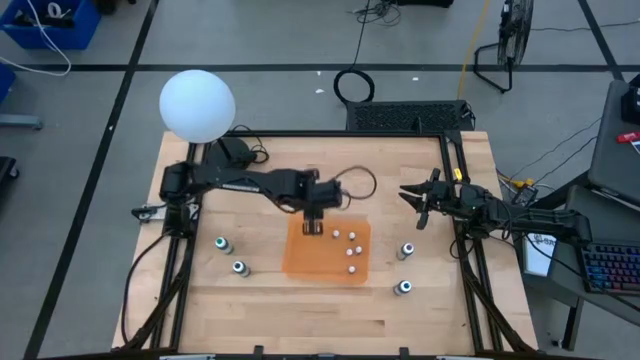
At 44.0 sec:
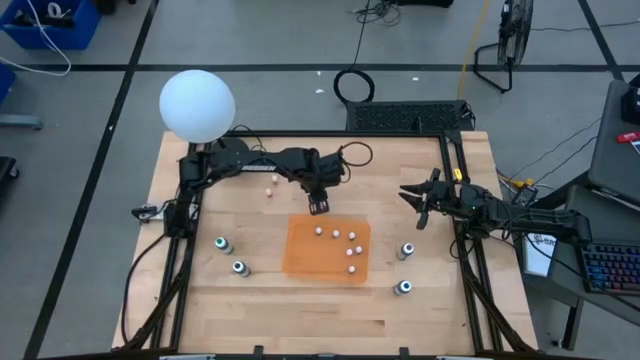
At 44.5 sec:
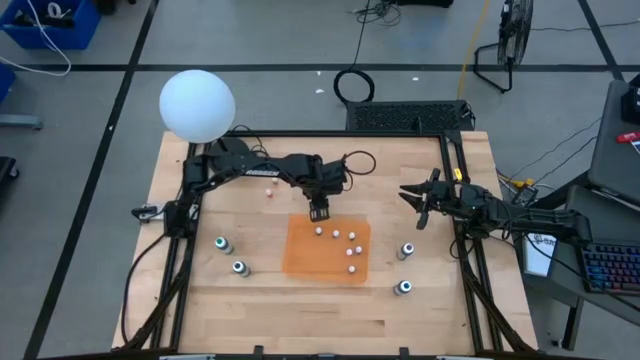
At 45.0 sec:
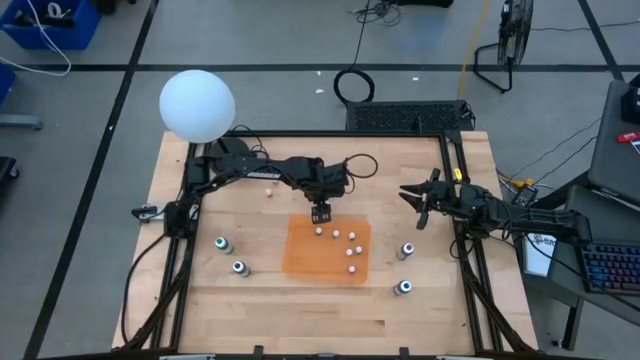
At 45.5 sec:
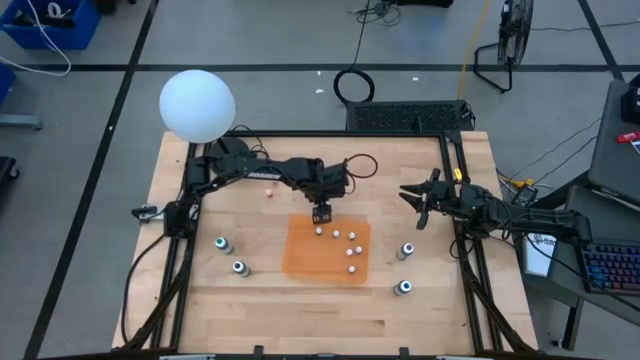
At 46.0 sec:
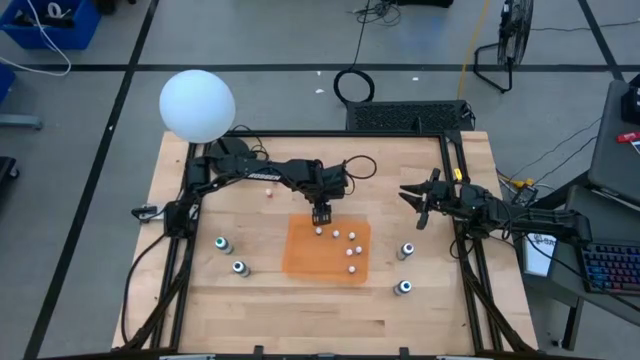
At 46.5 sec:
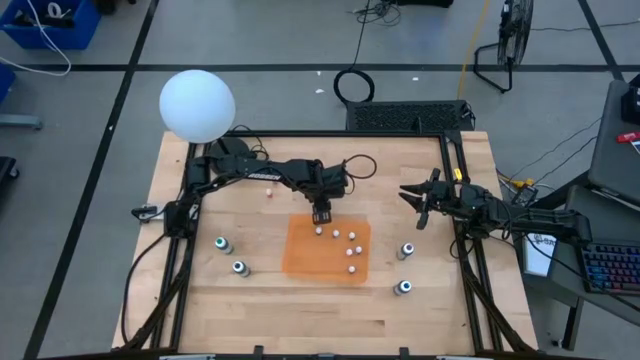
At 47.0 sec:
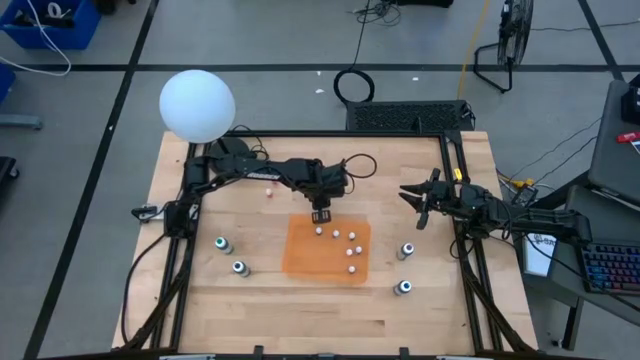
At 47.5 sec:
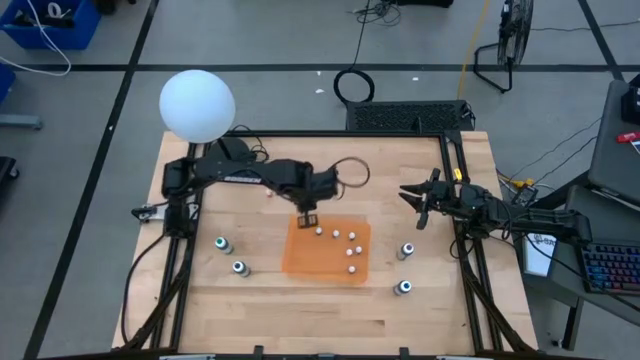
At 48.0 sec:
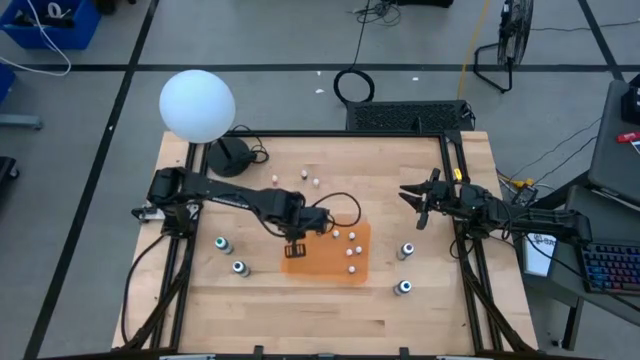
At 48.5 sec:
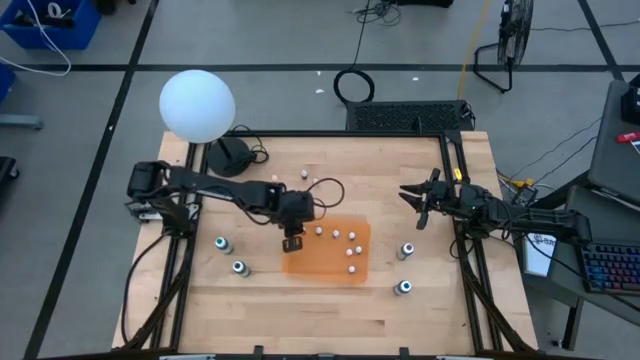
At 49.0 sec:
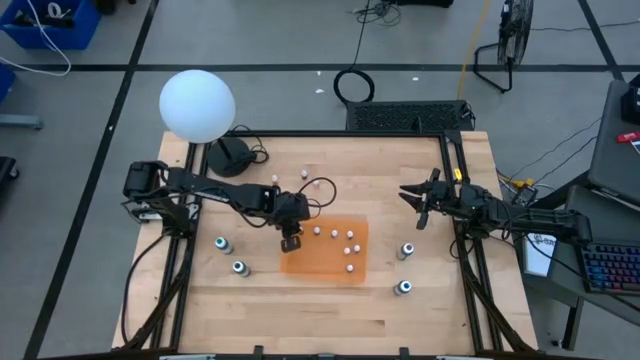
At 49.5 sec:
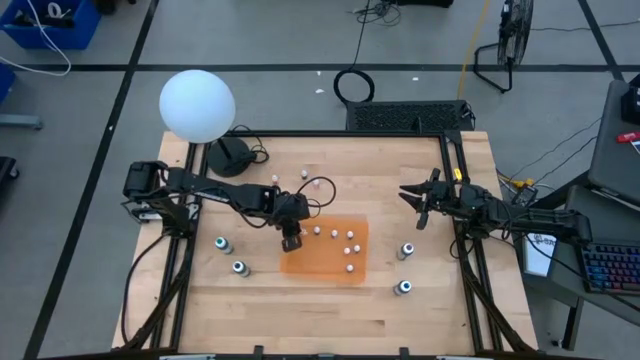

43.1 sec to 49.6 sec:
Task: Pick & Place food coloring
Put the green food coloring bottle into the orange bin

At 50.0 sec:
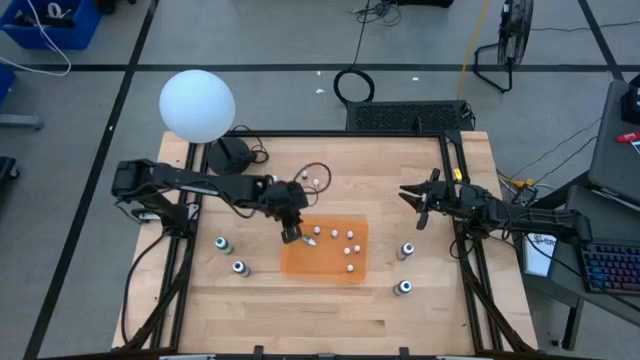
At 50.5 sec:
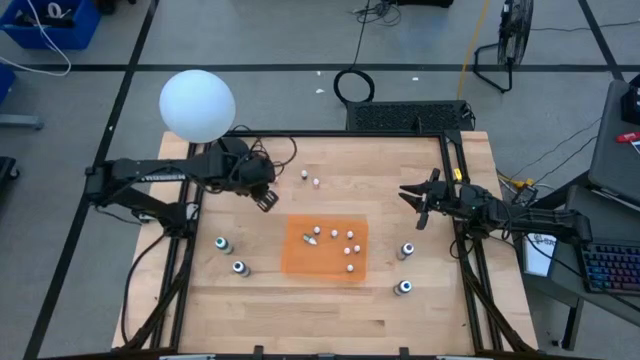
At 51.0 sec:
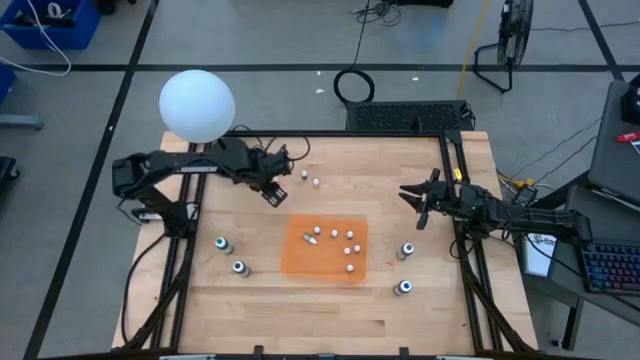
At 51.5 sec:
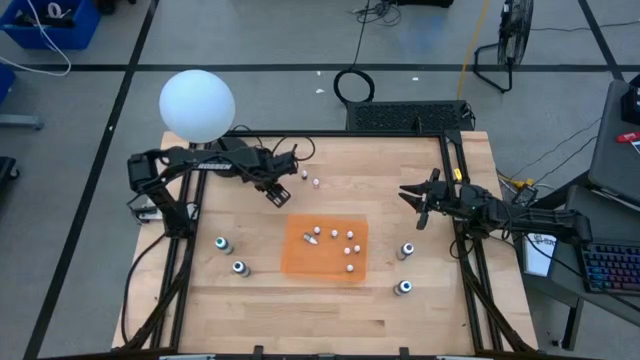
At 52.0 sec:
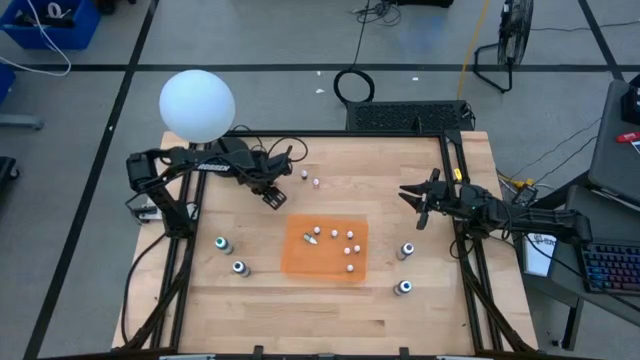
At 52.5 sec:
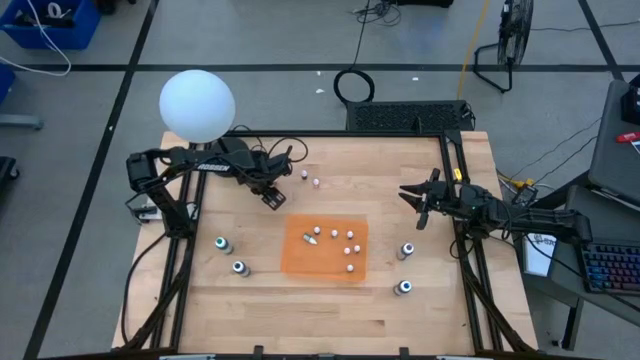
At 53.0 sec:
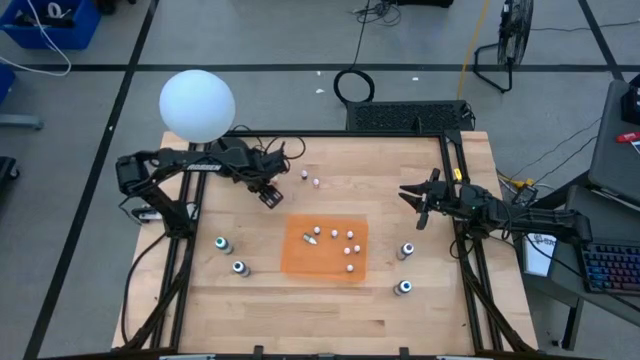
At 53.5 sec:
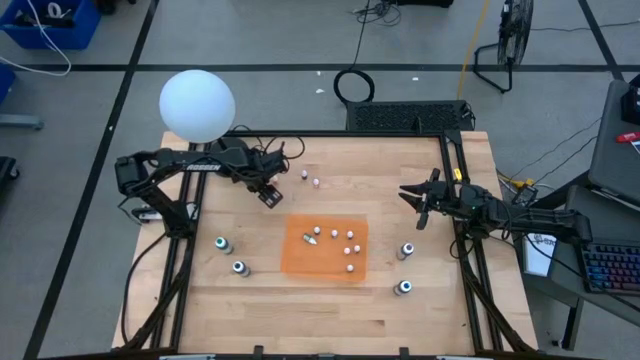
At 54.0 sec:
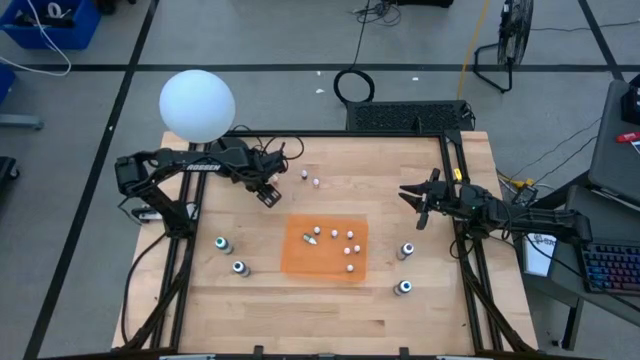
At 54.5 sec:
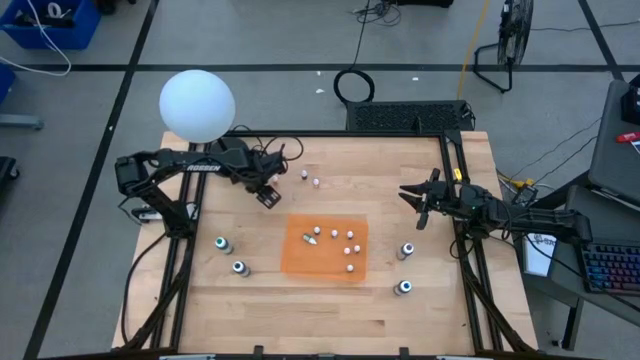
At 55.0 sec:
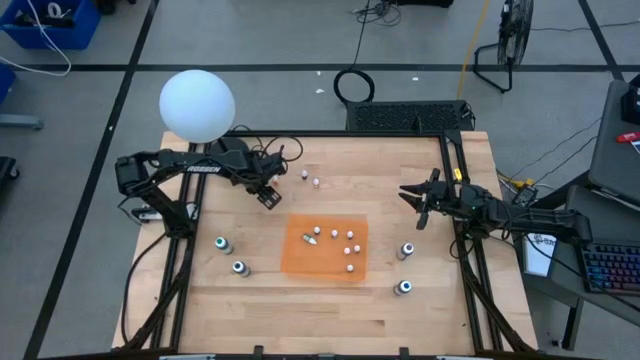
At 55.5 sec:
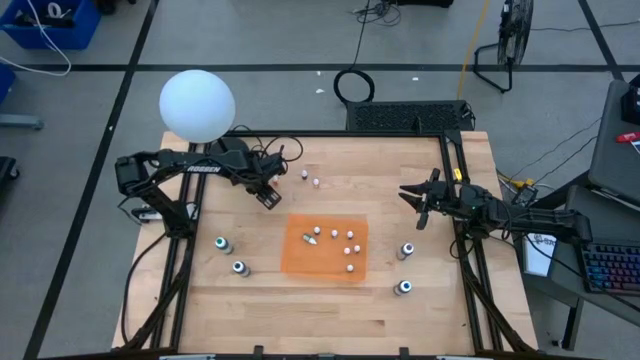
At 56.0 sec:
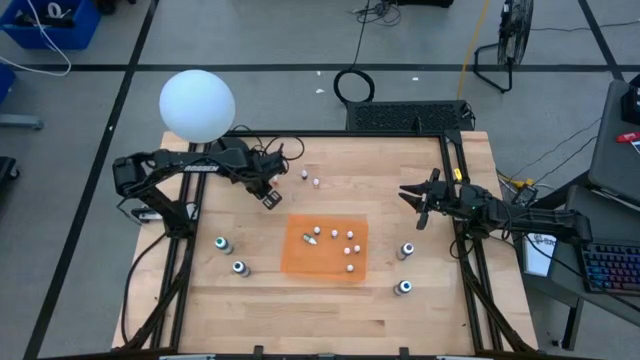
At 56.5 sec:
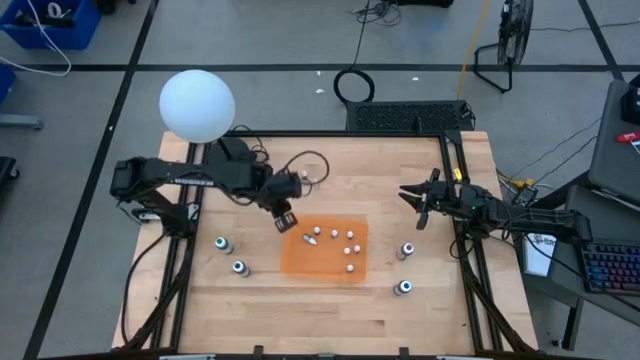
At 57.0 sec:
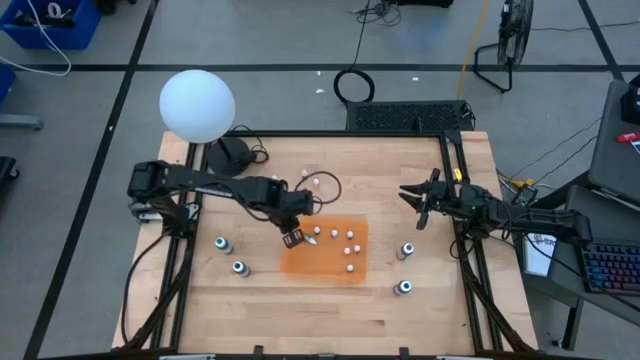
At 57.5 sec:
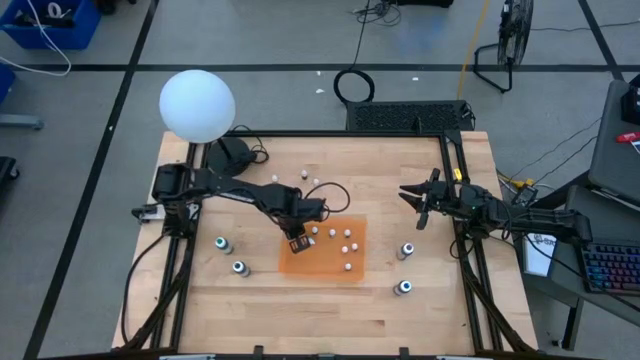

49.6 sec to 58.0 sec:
Put the left bottom orange food coloring bottle into the orange bin

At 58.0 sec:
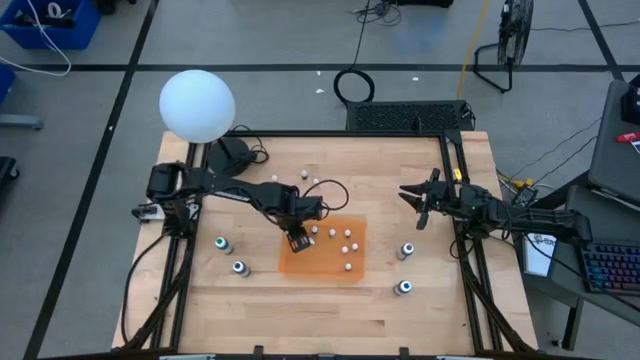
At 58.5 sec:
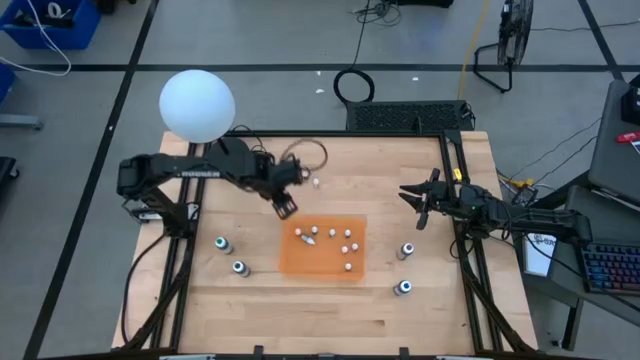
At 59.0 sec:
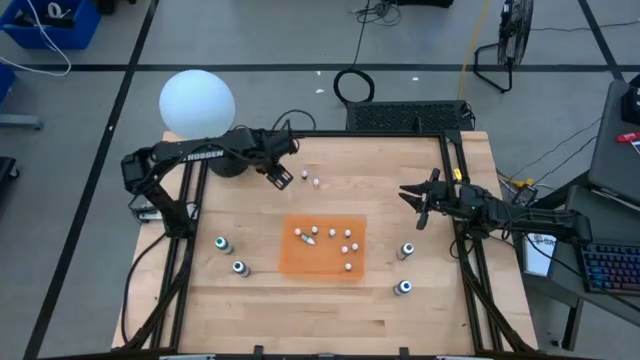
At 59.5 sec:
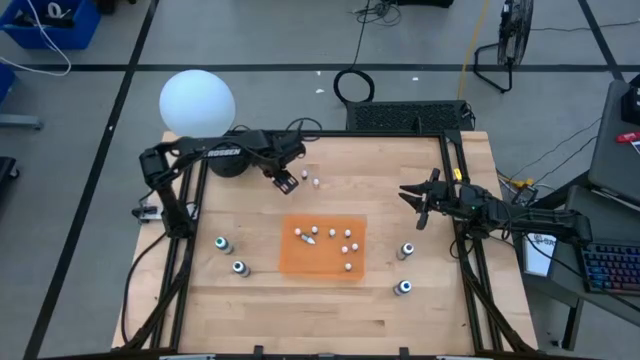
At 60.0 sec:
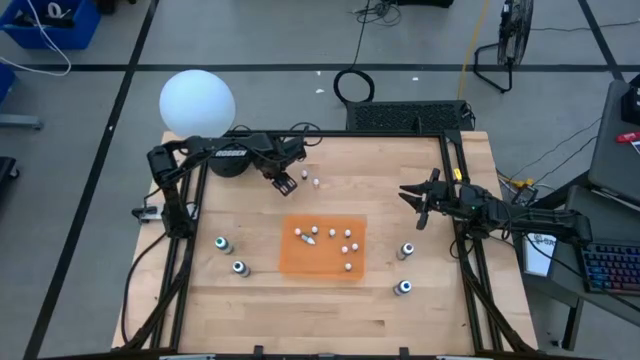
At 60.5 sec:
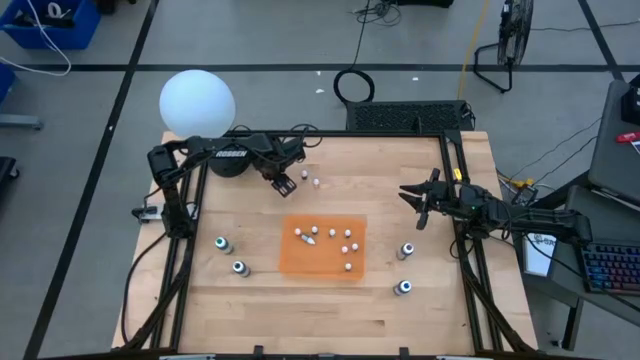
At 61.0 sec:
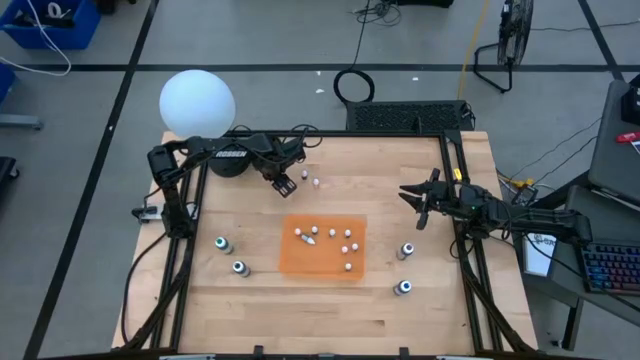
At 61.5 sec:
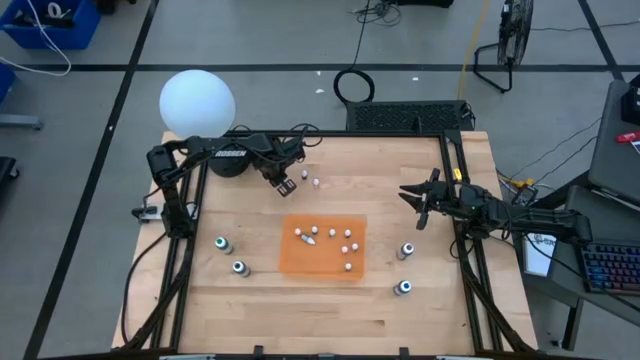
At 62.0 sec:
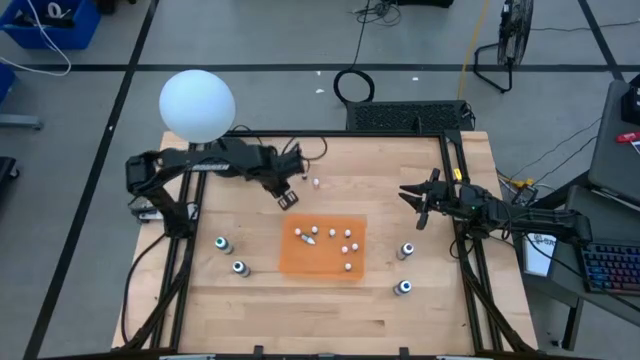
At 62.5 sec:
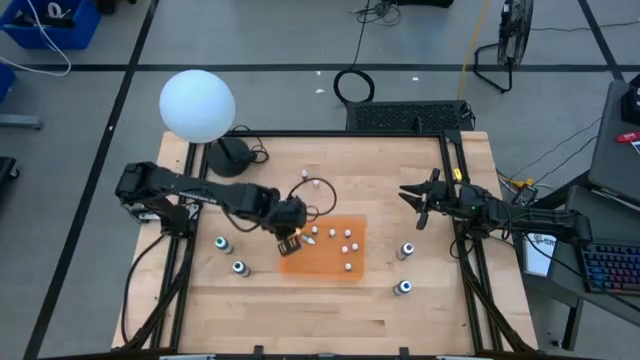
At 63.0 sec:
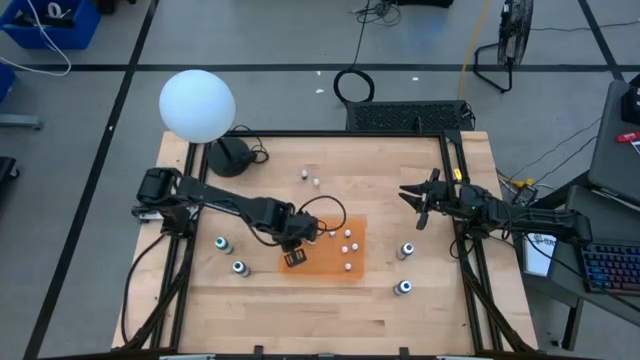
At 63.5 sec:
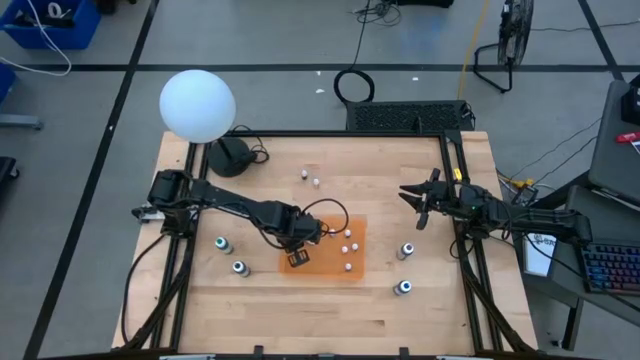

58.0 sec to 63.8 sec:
Put the left orange food coloring bottle into the orange bin
